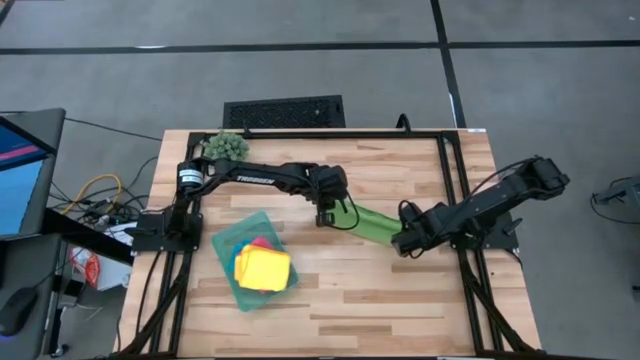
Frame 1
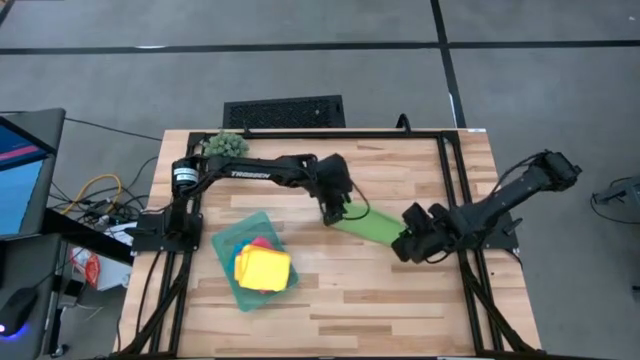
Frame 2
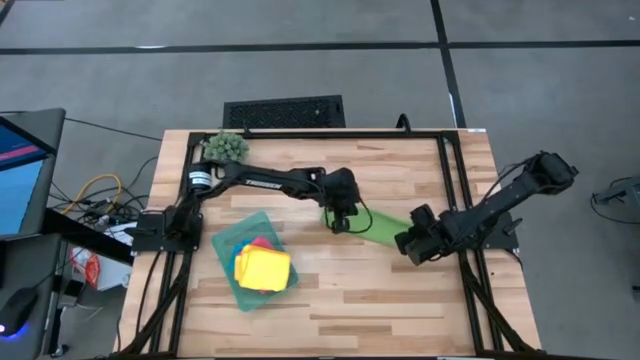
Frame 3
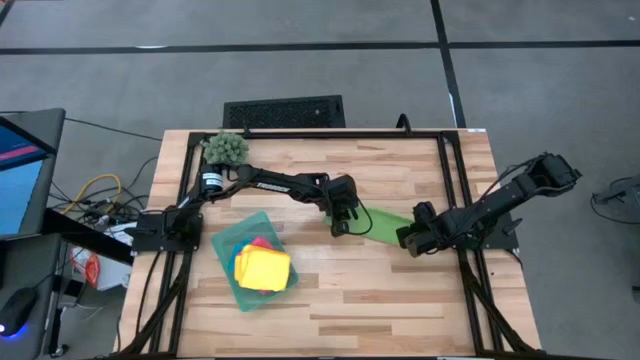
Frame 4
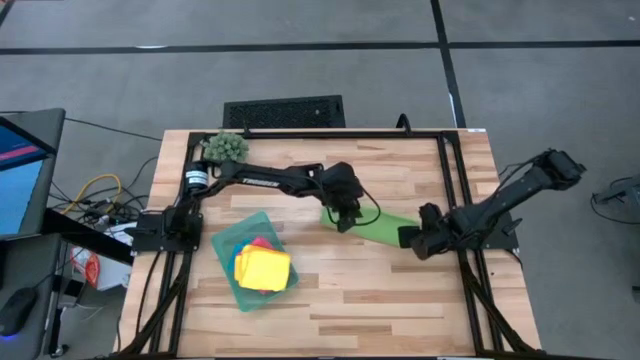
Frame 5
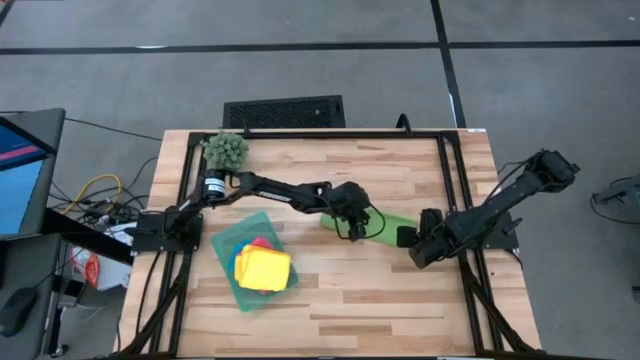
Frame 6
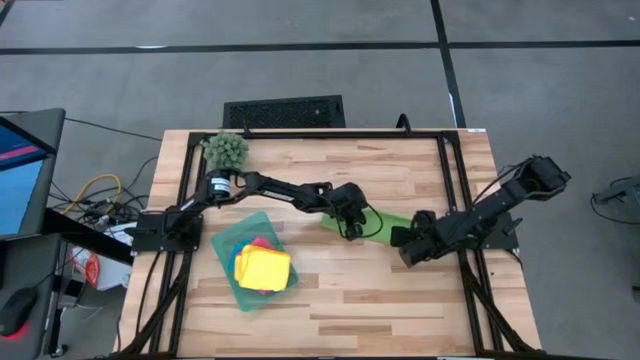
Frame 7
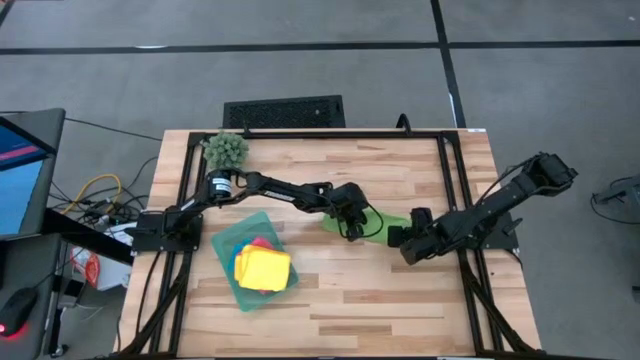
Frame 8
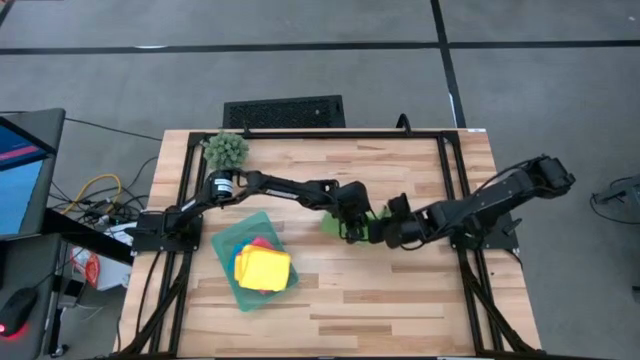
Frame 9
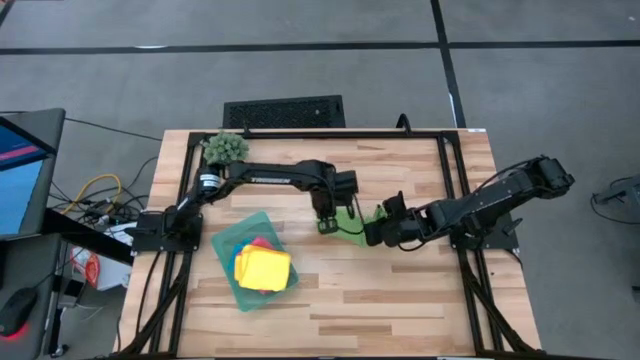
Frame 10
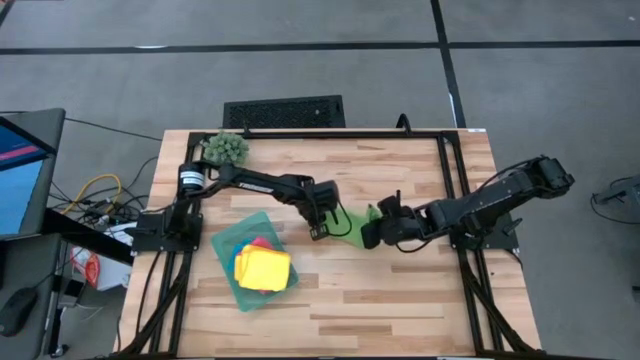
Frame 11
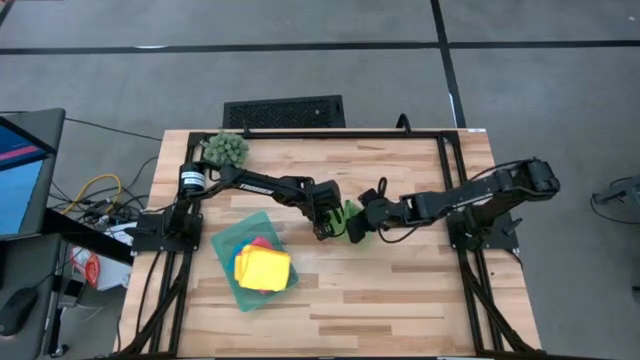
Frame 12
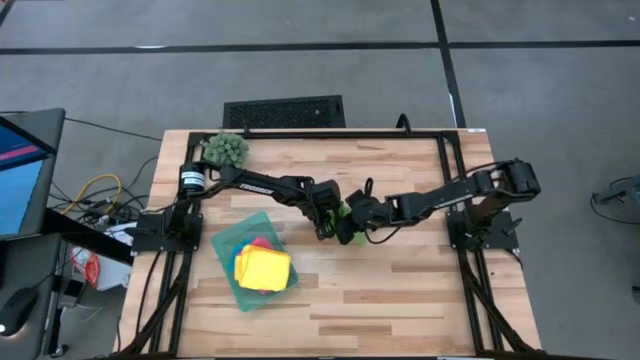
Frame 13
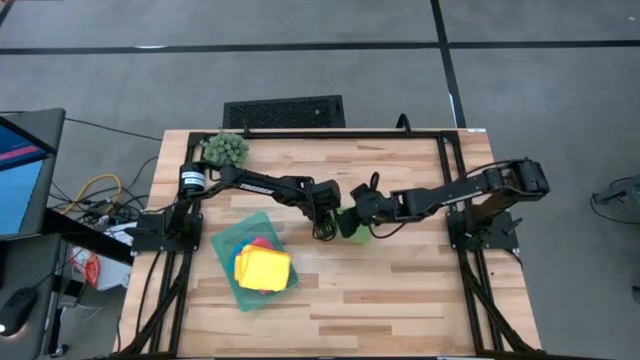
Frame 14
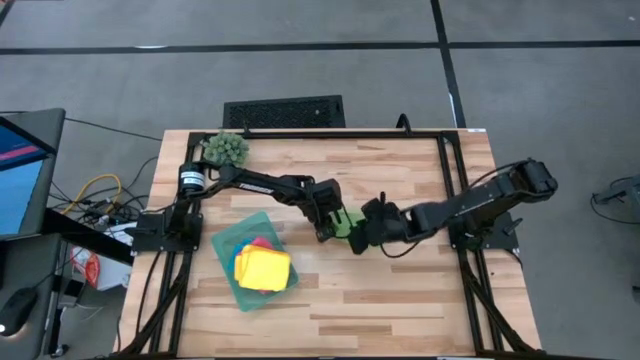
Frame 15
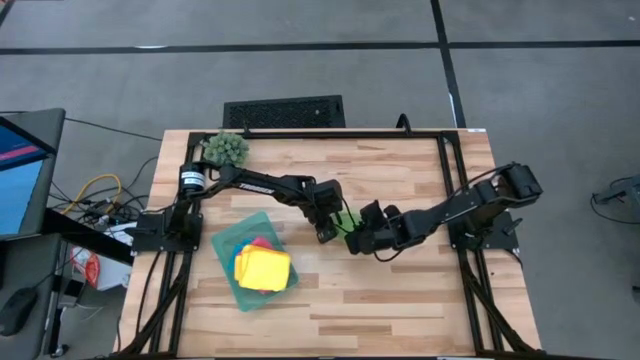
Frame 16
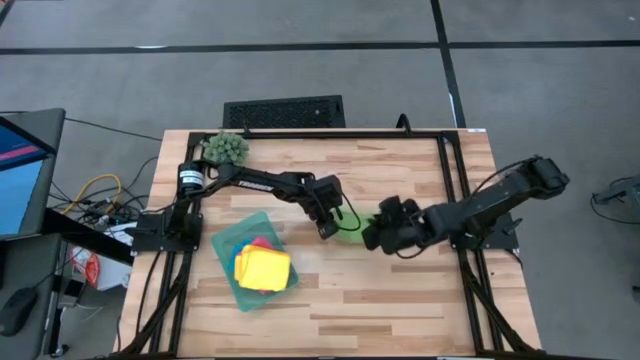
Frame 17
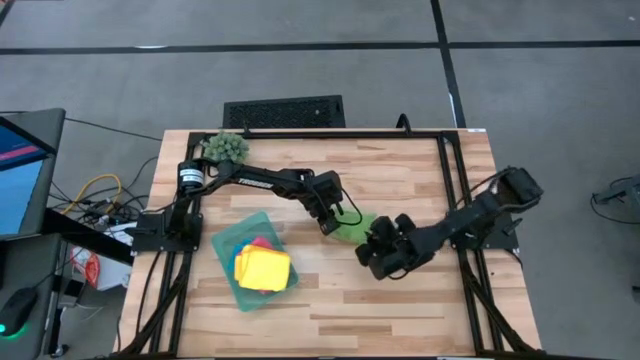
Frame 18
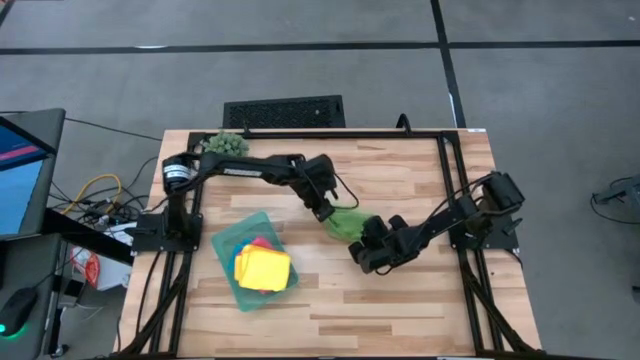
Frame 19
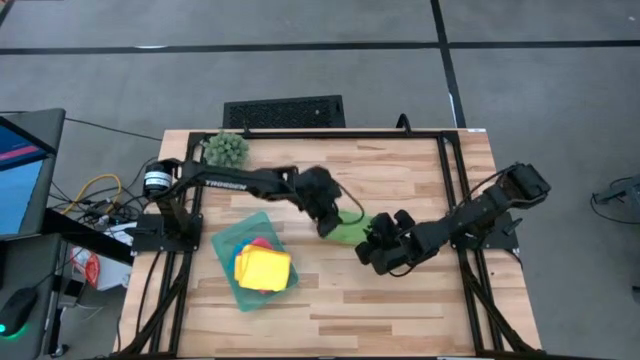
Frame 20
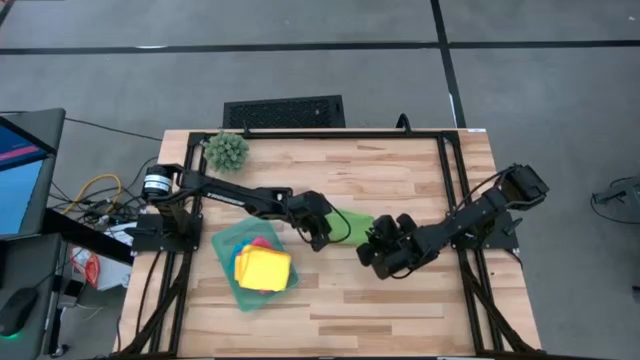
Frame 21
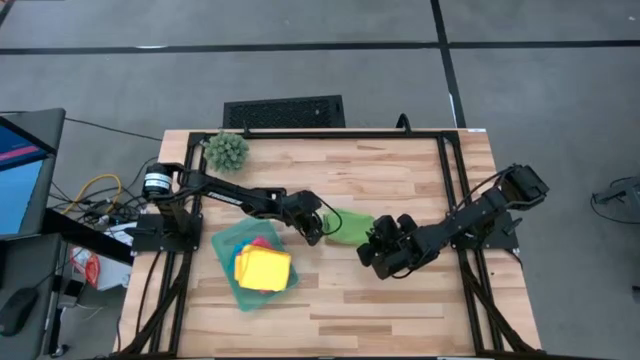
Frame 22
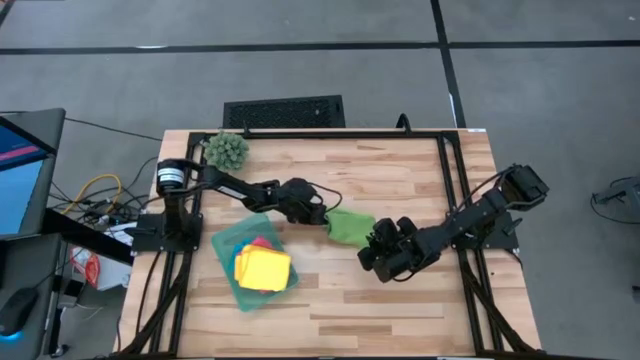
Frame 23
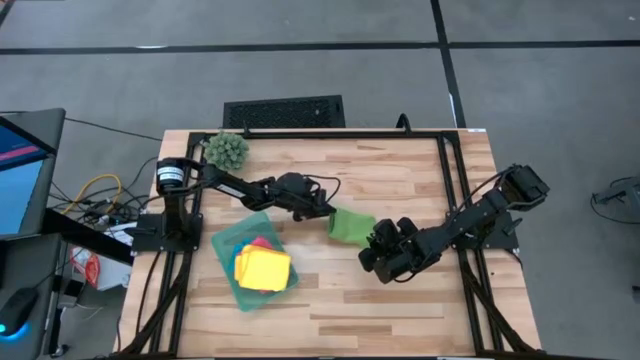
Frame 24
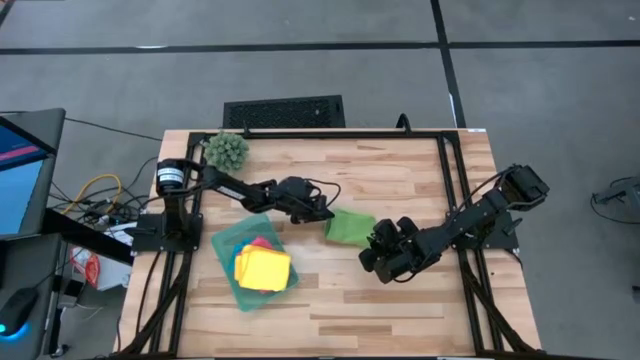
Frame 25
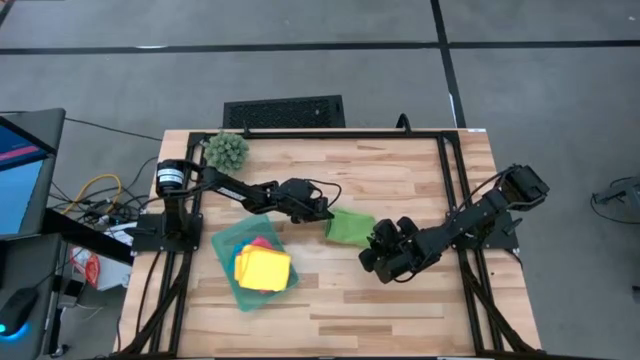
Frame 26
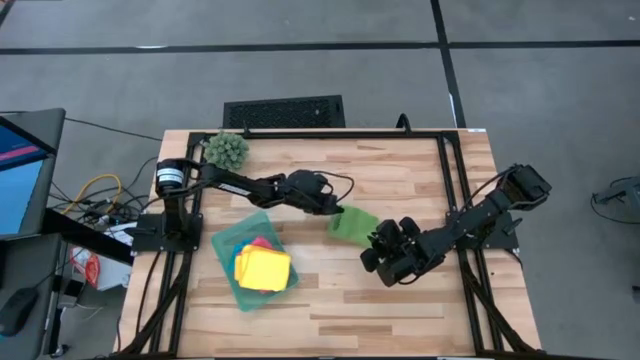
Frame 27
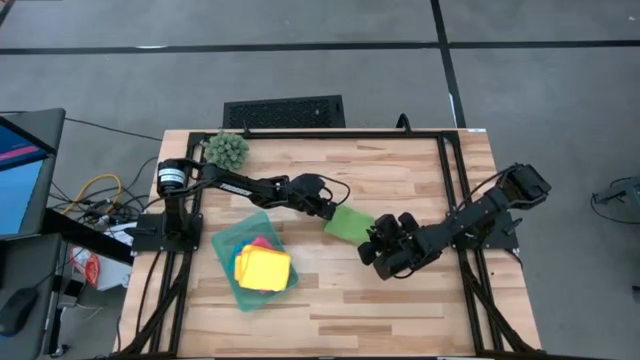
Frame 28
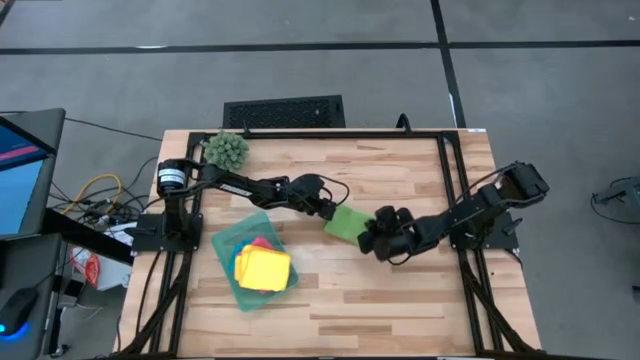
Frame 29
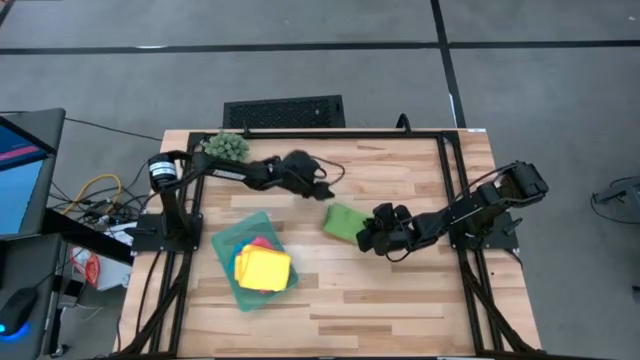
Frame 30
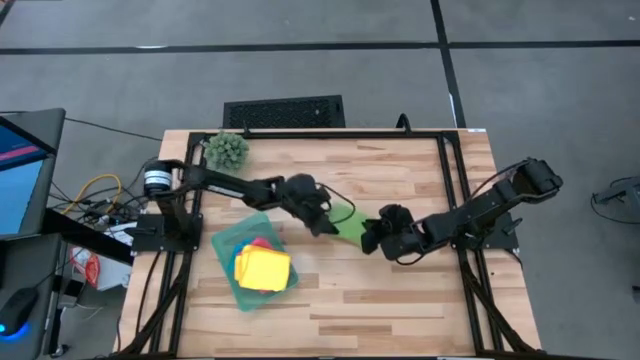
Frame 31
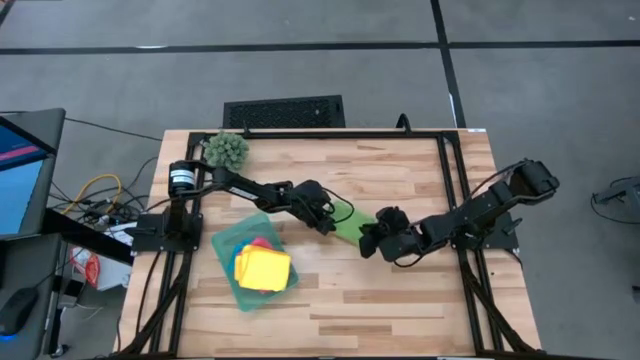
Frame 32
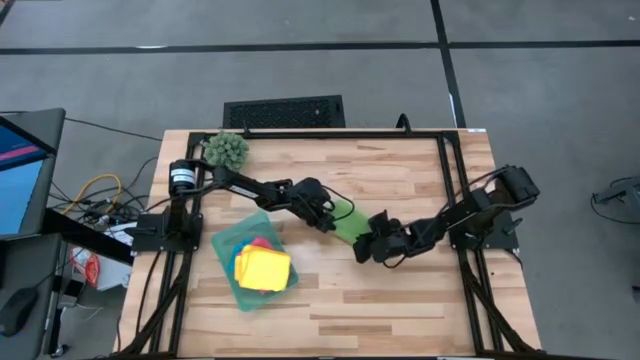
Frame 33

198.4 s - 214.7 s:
Task: Fold microfiber towels
Fold the green microfiber towel

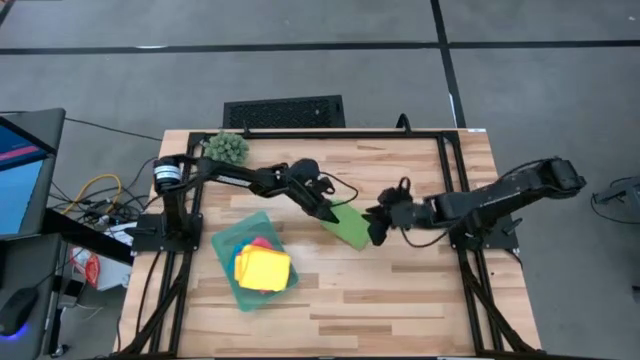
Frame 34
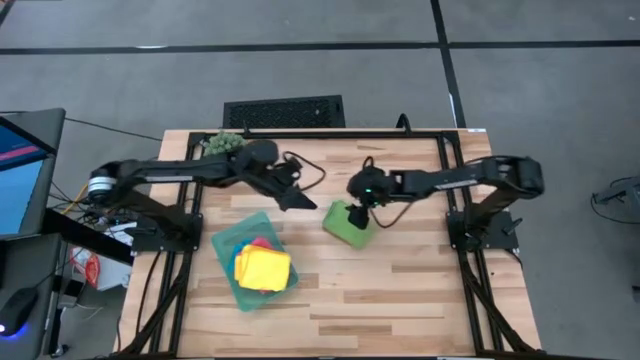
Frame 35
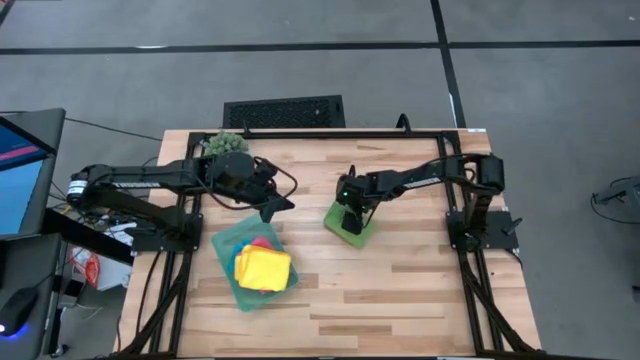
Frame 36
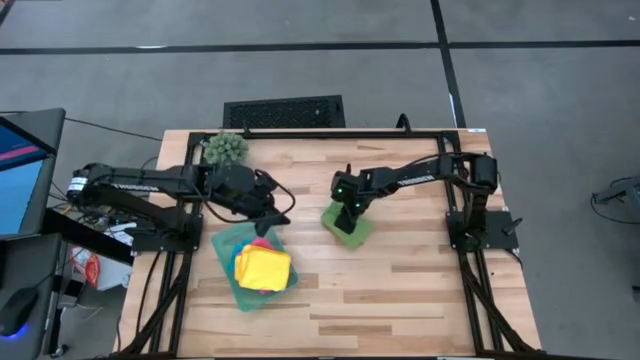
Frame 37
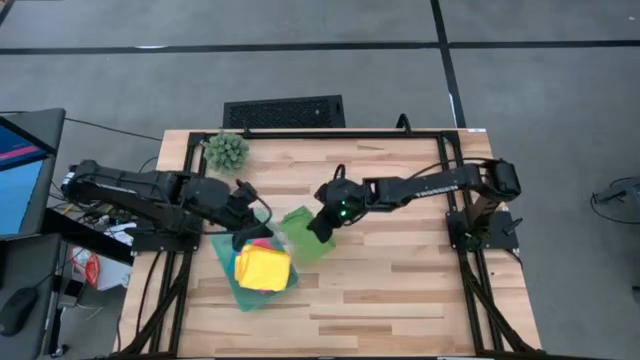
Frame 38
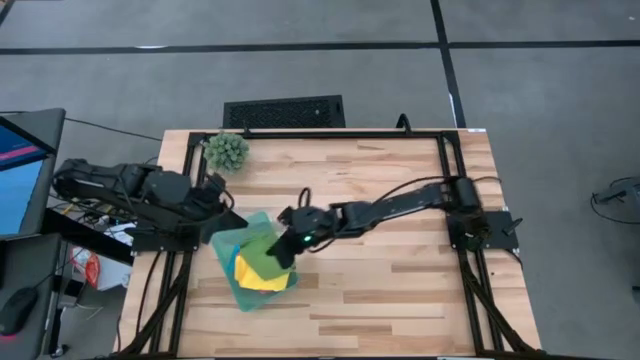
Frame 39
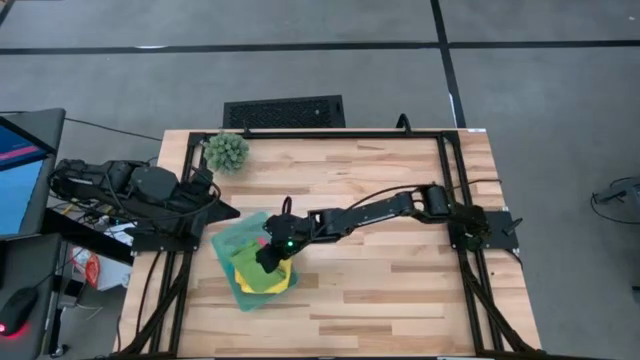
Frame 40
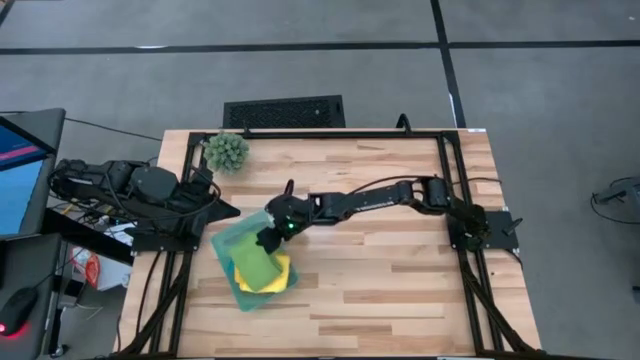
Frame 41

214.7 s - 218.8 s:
Put the folded green microfiber towel into the bin
